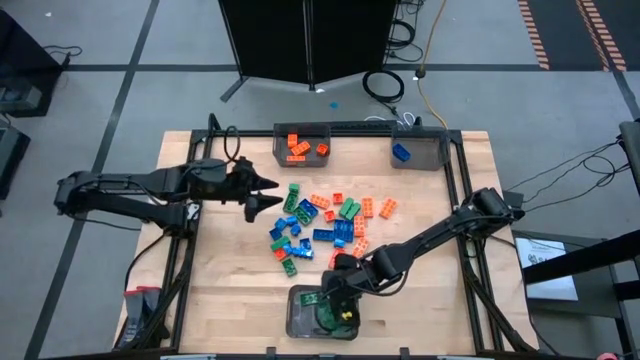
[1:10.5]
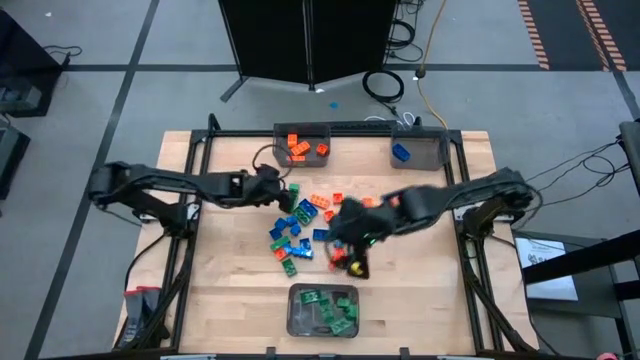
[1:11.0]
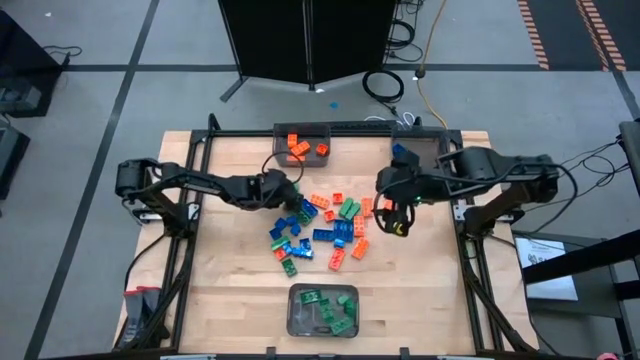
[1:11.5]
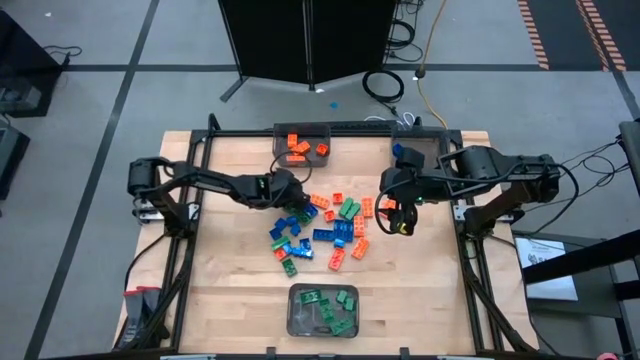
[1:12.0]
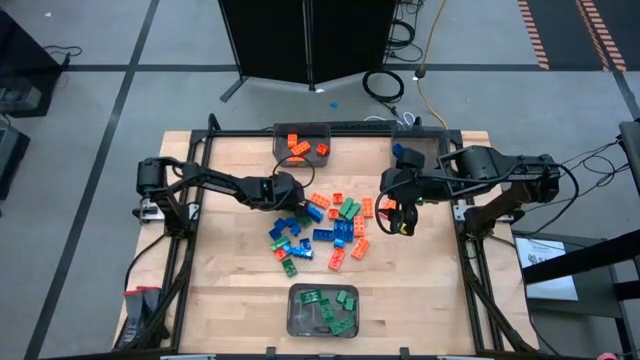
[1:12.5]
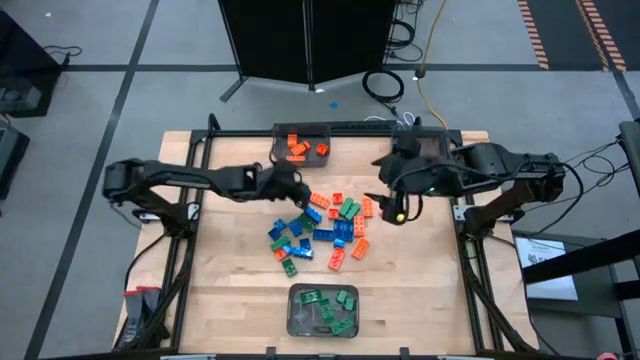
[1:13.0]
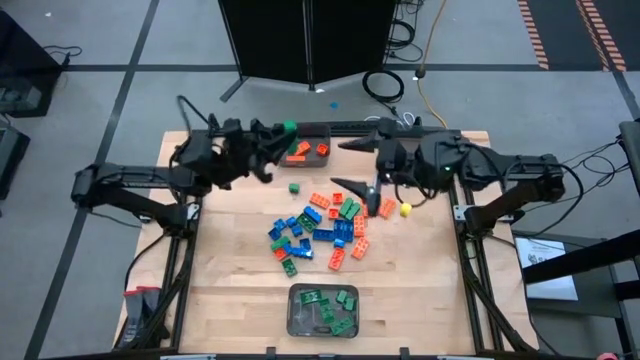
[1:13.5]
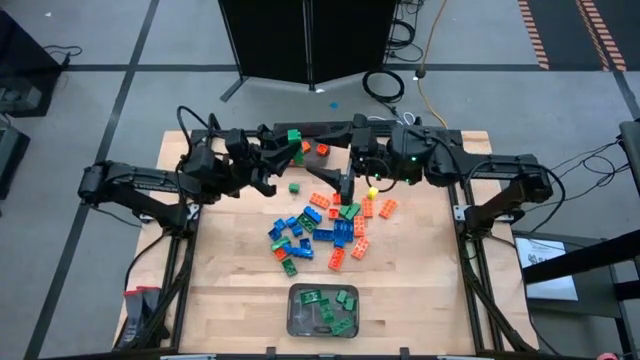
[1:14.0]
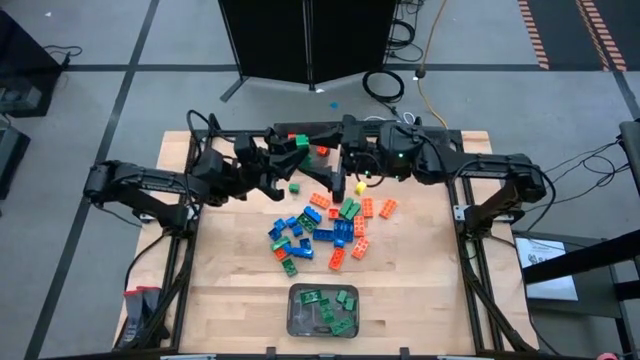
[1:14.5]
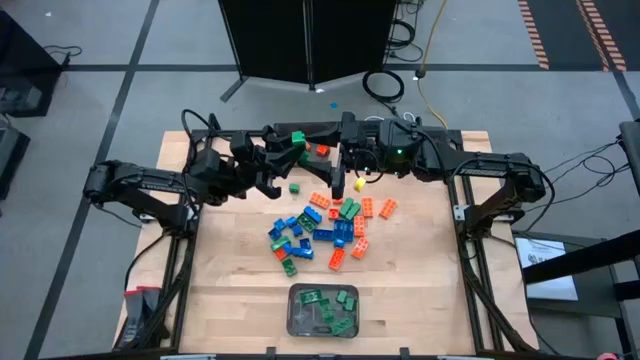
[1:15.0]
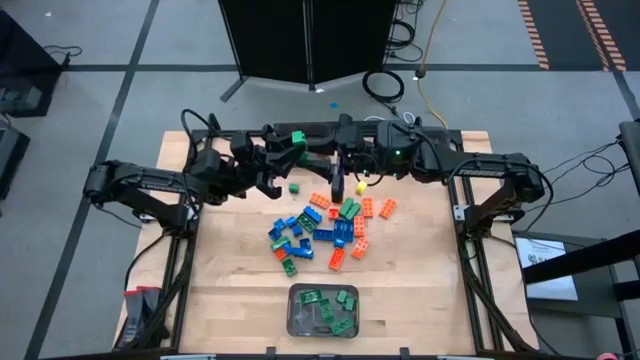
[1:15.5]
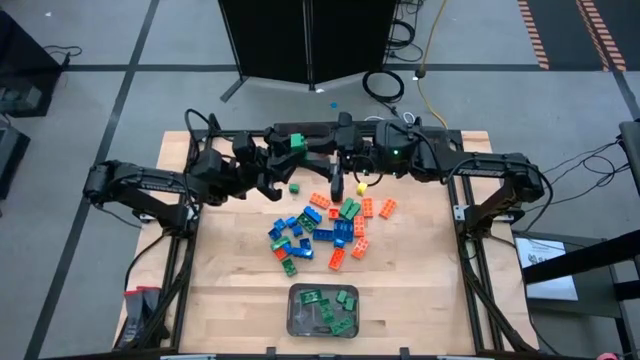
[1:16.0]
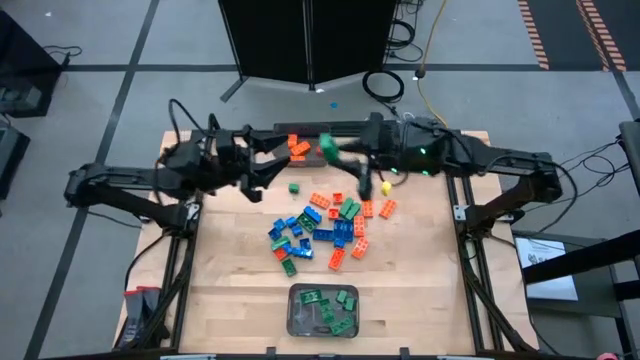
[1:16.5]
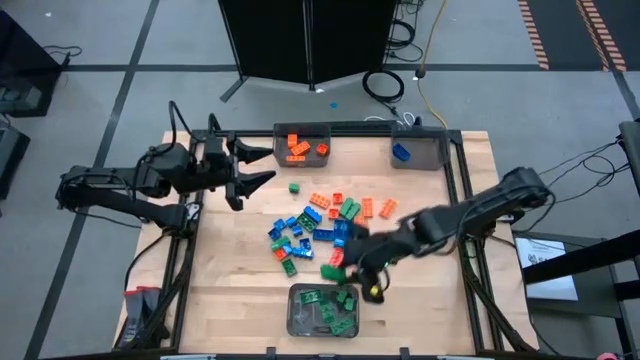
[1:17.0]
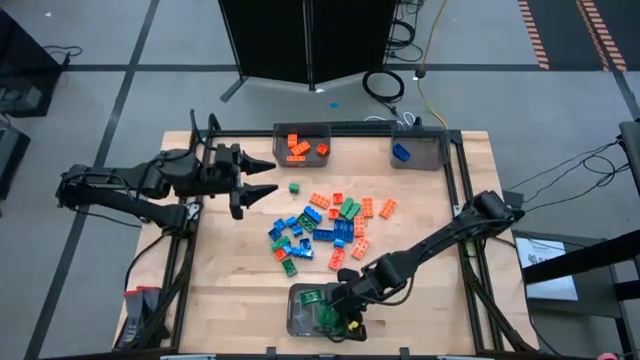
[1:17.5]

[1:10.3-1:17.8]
Task: Sort blocks
Put the green game piece into the bottom black bin

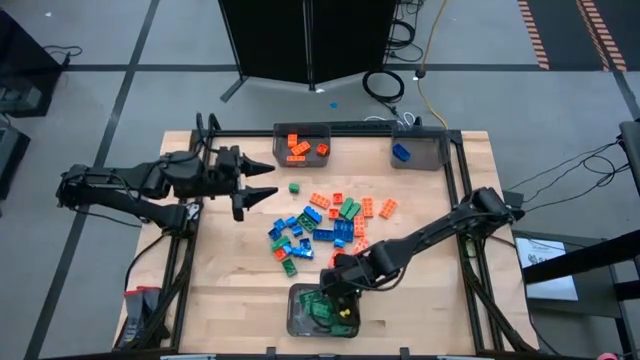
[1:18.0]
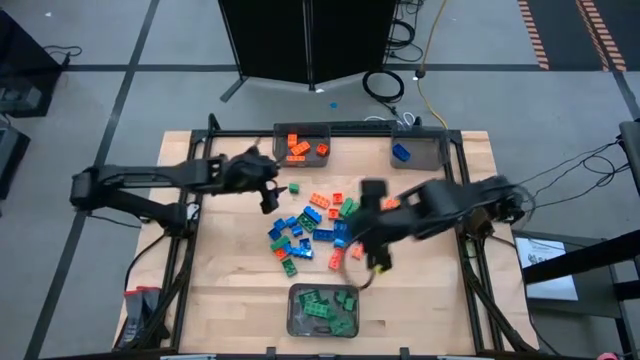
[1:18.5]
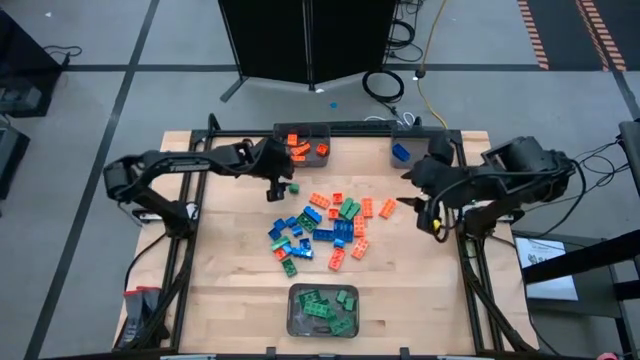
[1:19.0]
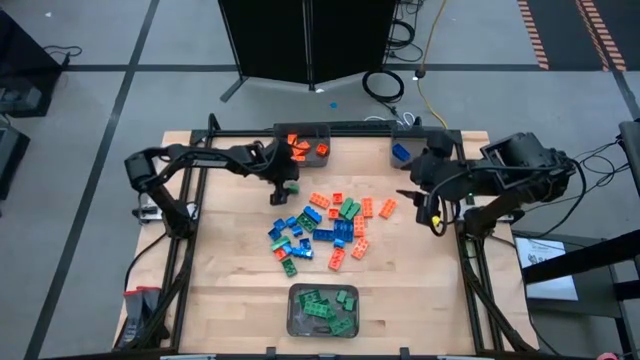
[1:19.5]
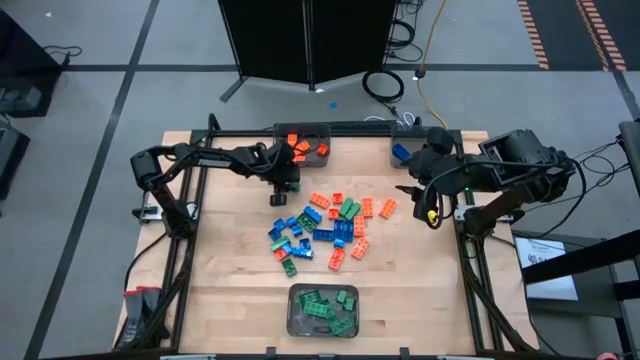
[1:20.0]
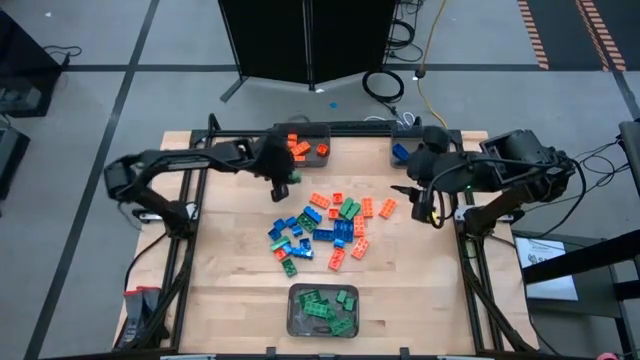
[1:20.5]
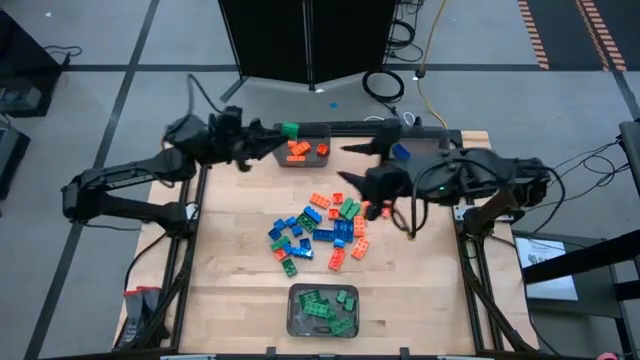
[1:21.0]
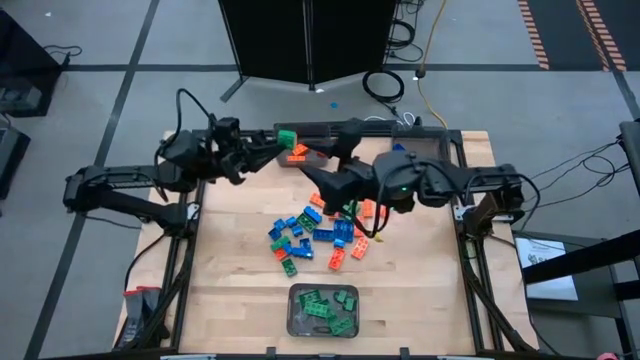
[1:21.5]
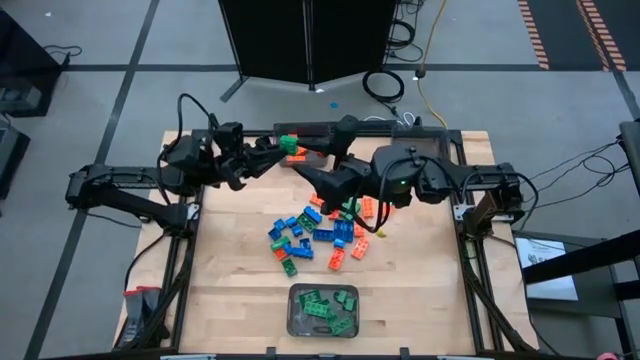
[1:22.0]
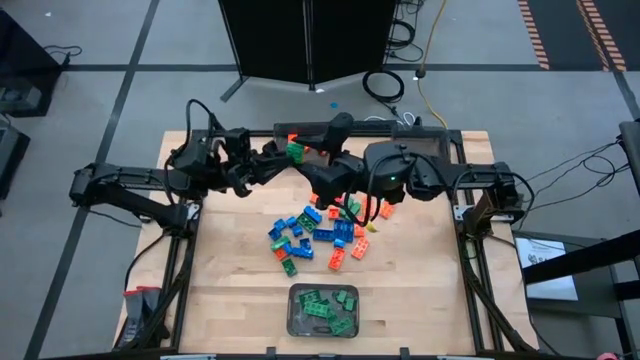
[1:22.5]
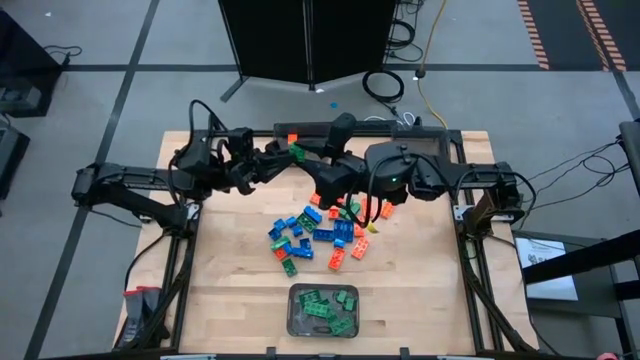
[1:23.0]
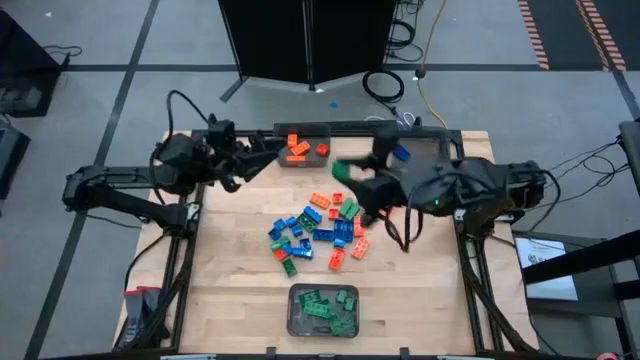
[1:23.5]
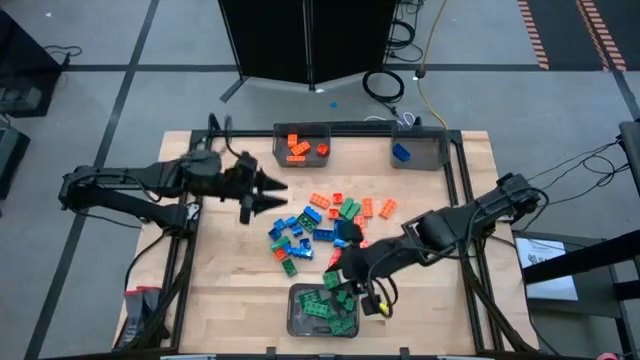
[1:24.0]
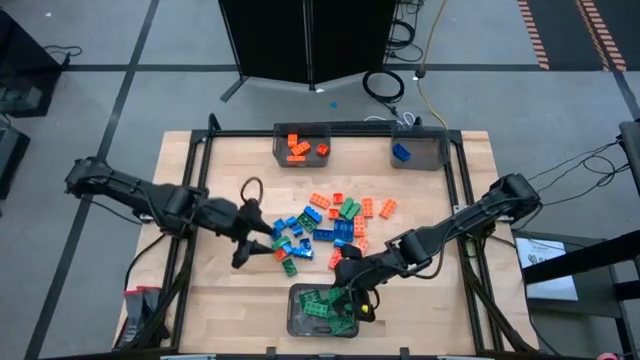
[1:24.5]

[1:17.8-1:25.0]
Put the green game piece into the bottom black bin

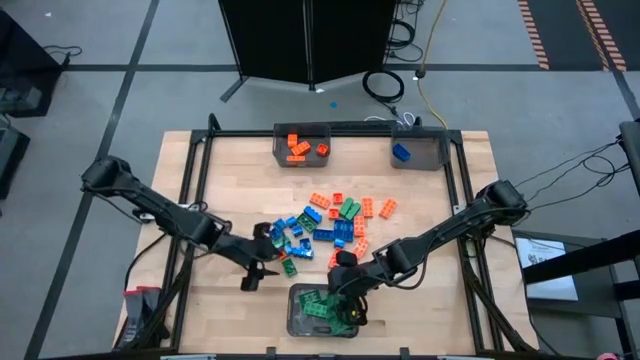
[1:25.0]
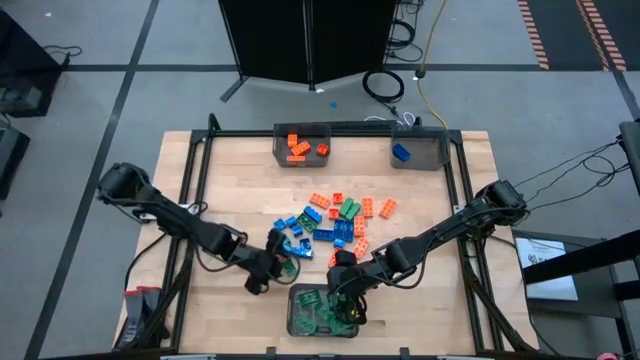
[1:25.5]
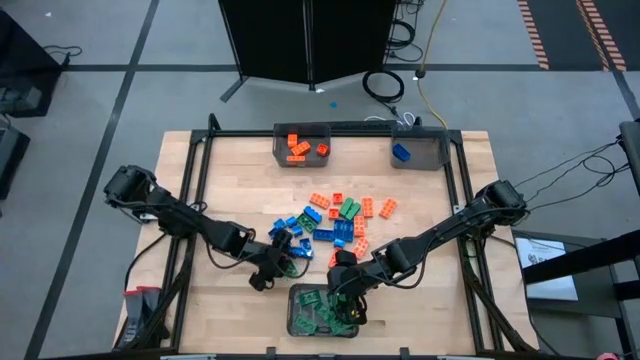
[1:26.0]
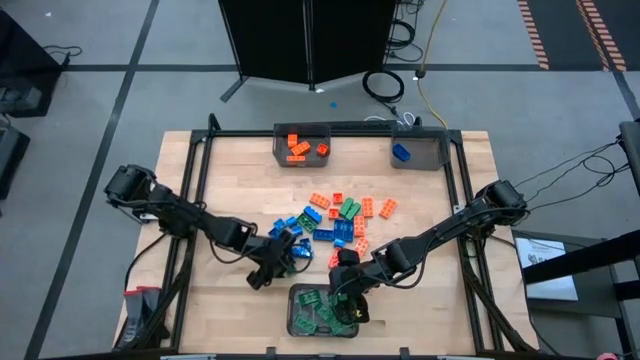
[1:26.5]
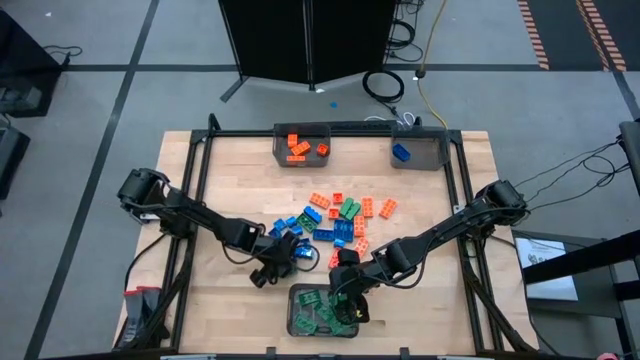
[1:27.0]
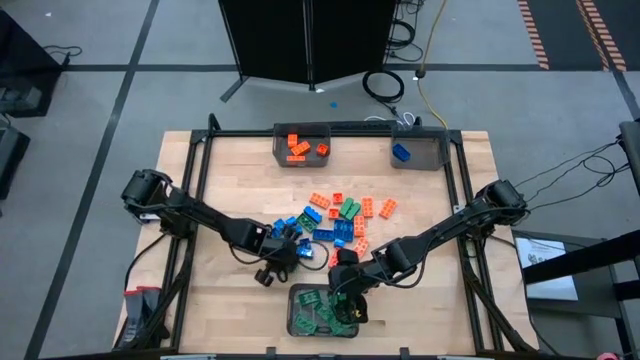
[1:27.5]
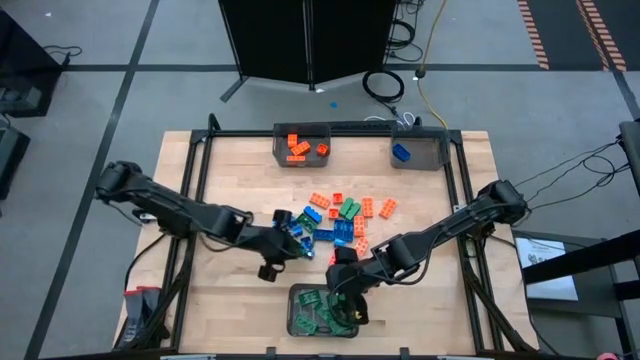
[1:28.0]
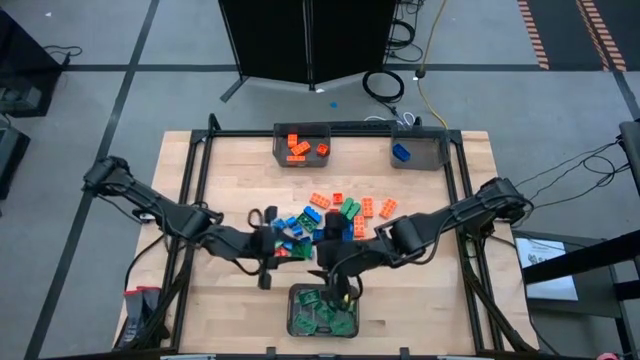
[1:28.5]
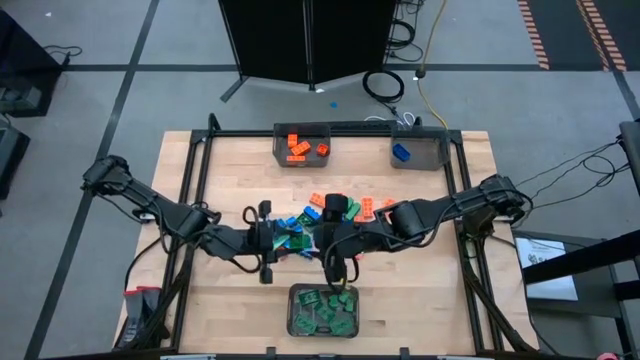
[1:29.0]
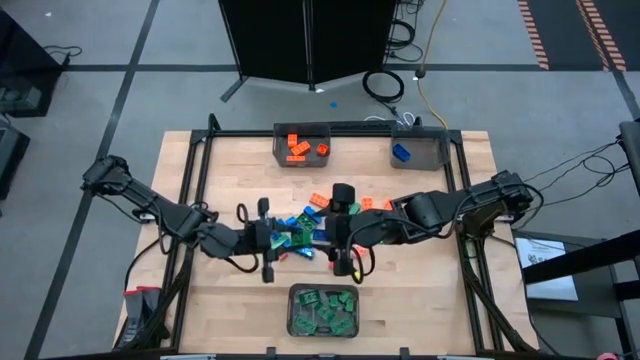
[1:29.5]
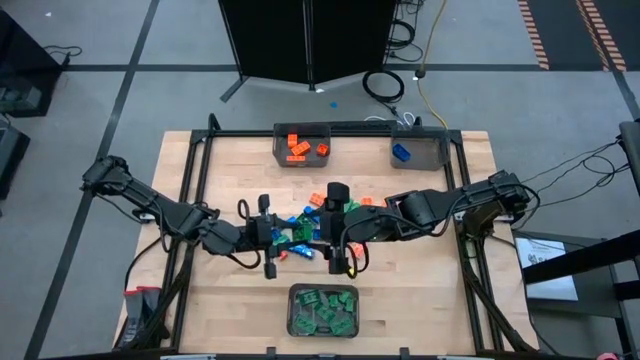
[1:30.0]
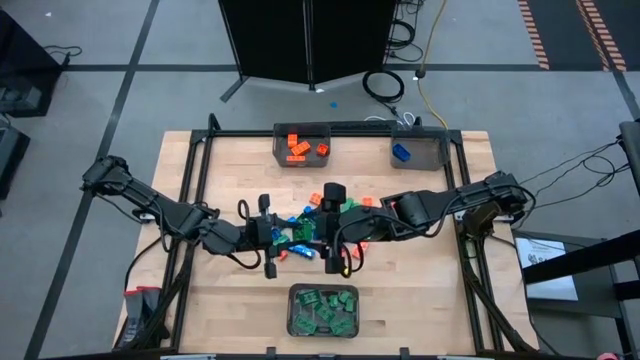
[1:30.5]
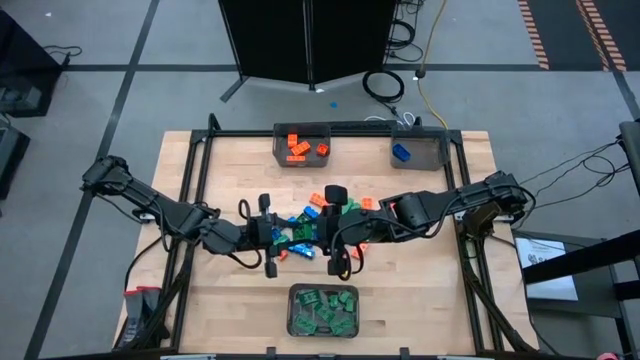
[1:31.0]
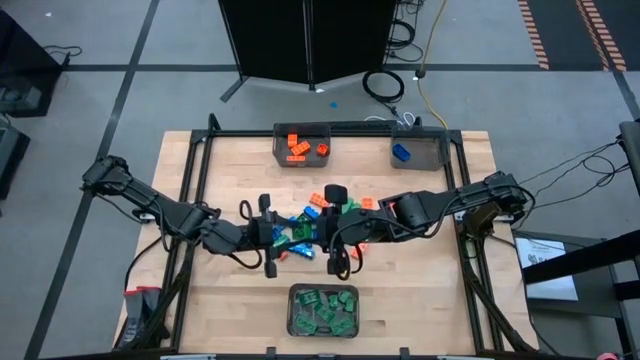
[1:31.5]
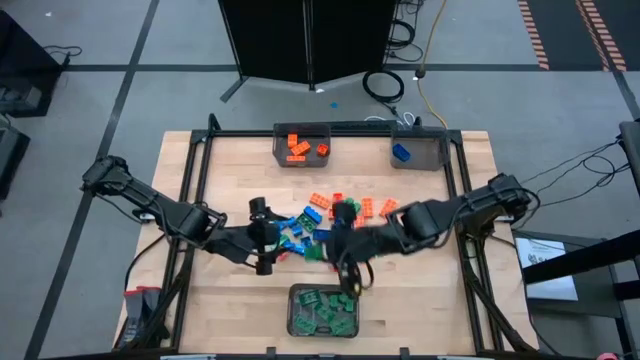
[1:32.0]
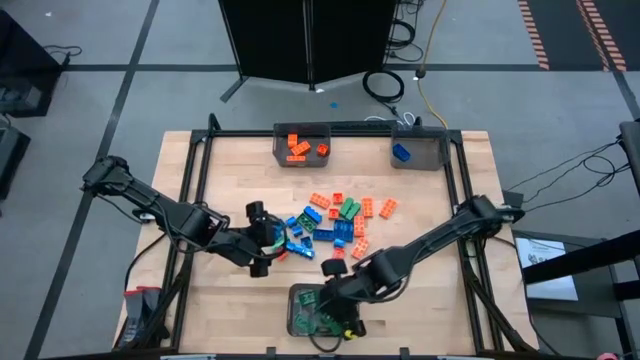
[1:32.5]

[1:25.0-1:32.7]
Put the green game piece into the bottom black bin
